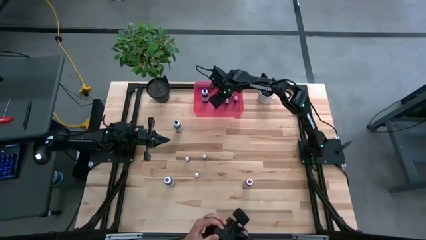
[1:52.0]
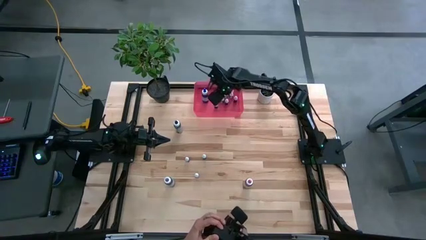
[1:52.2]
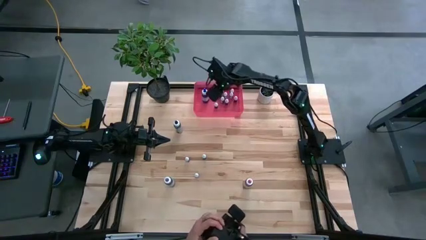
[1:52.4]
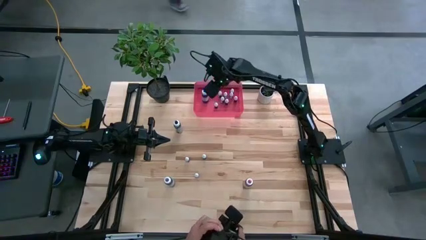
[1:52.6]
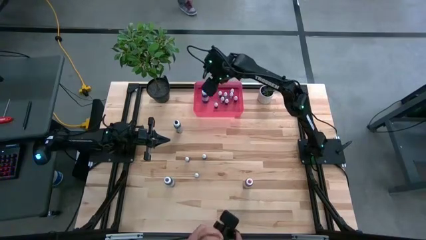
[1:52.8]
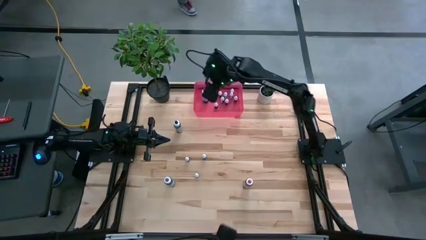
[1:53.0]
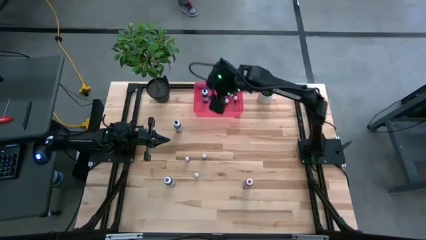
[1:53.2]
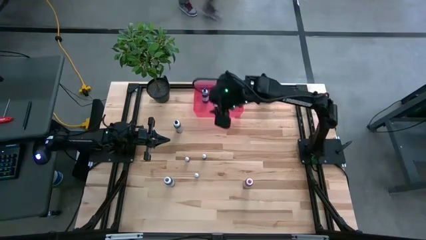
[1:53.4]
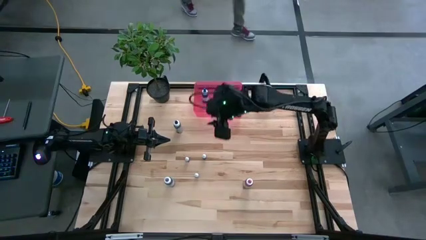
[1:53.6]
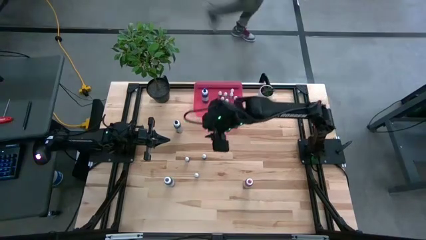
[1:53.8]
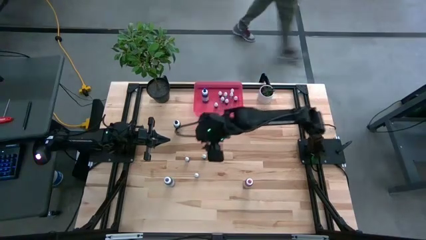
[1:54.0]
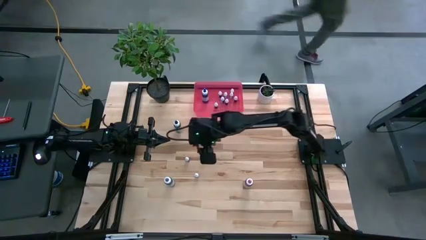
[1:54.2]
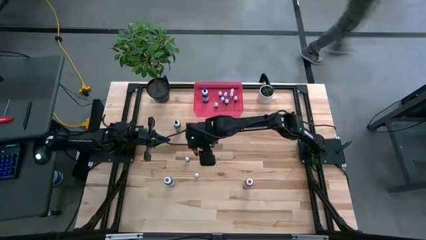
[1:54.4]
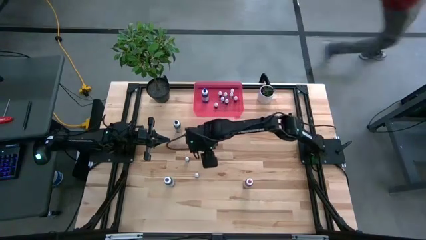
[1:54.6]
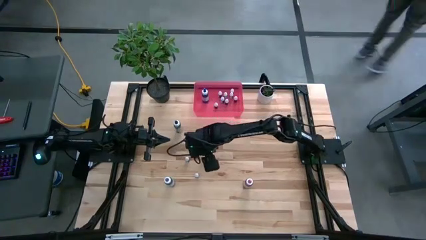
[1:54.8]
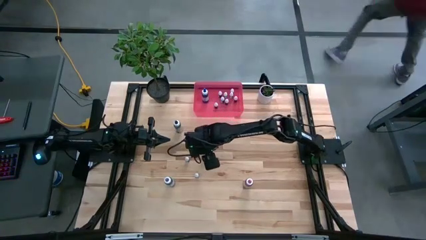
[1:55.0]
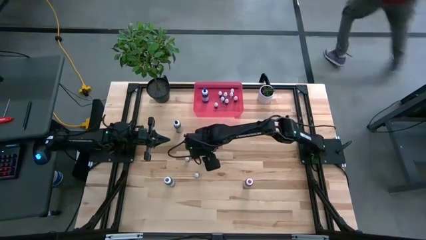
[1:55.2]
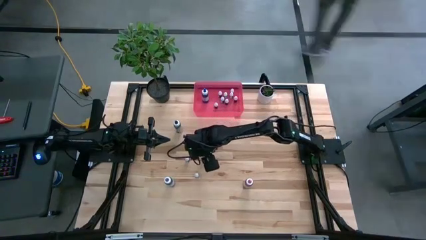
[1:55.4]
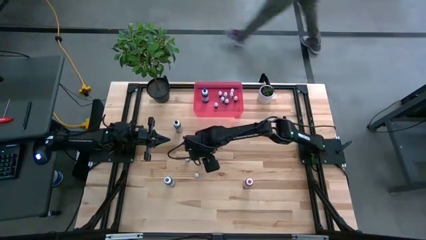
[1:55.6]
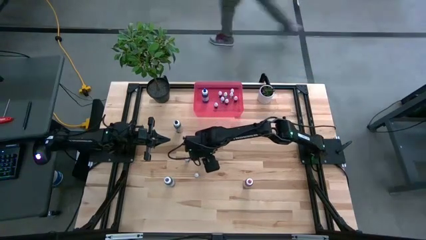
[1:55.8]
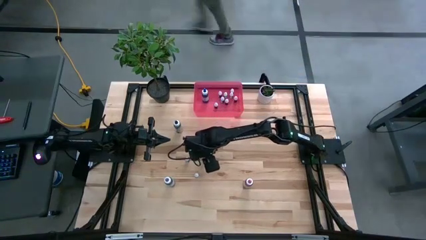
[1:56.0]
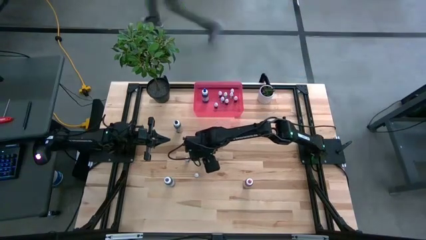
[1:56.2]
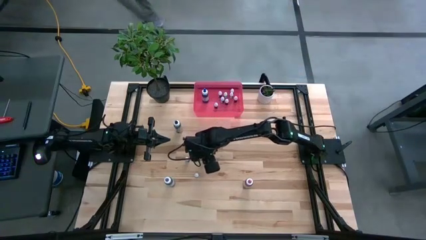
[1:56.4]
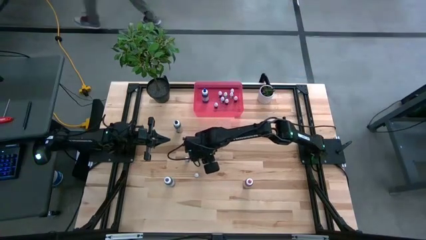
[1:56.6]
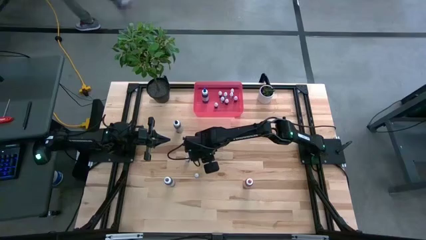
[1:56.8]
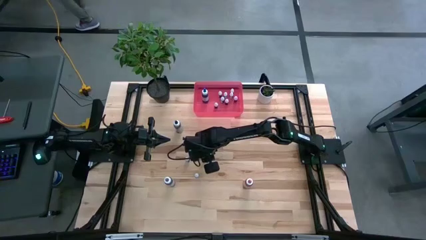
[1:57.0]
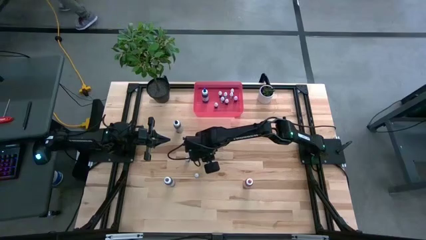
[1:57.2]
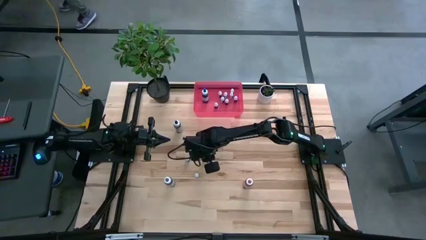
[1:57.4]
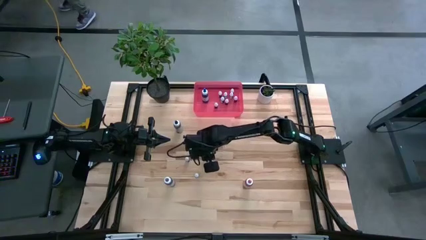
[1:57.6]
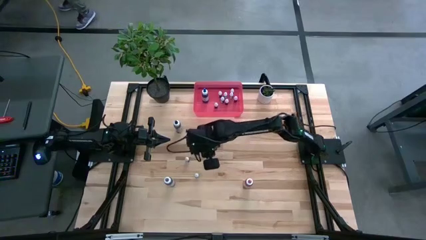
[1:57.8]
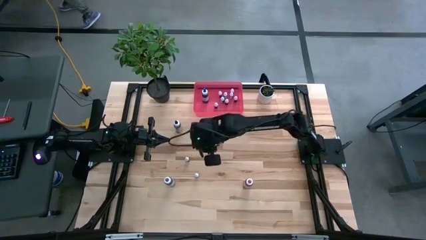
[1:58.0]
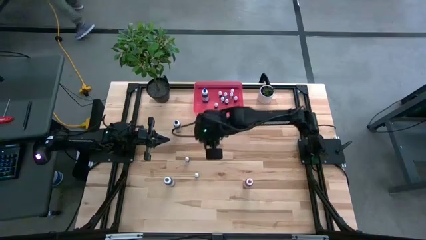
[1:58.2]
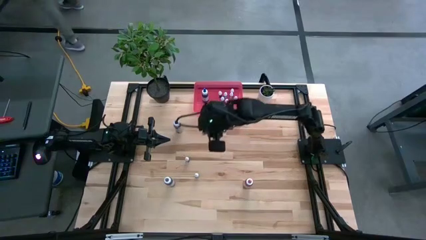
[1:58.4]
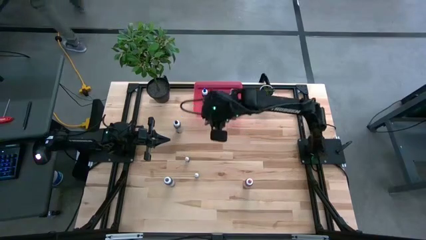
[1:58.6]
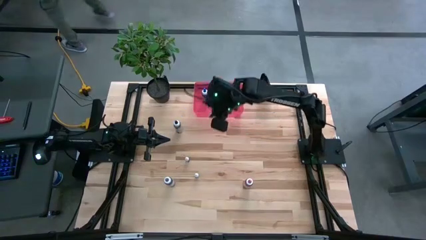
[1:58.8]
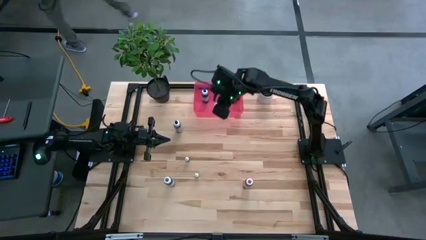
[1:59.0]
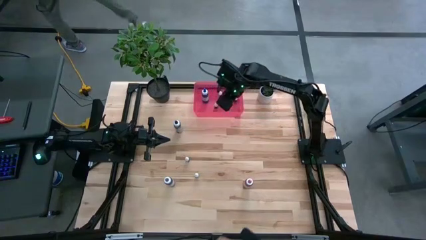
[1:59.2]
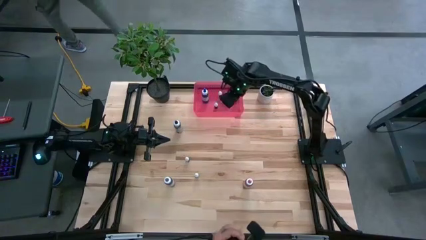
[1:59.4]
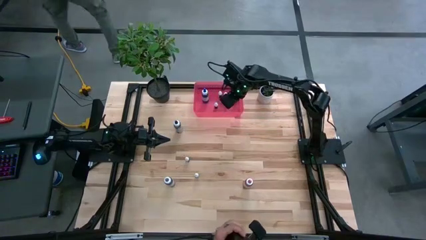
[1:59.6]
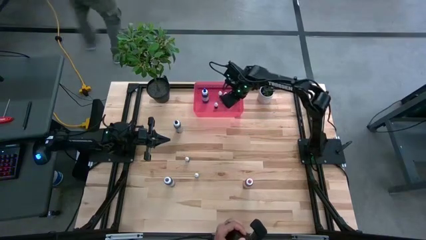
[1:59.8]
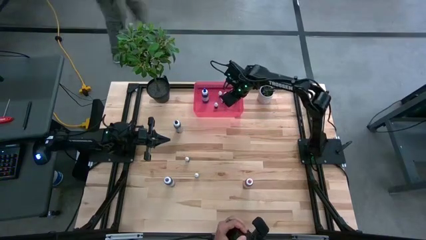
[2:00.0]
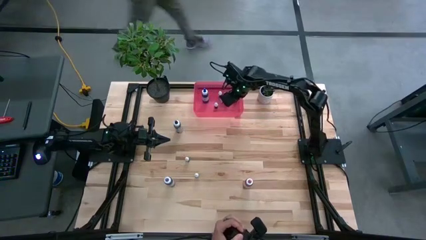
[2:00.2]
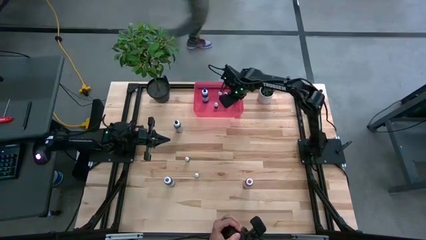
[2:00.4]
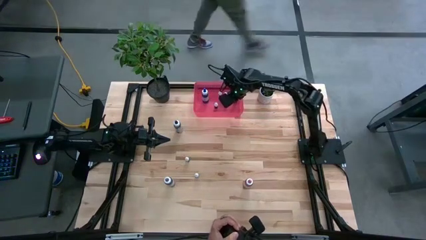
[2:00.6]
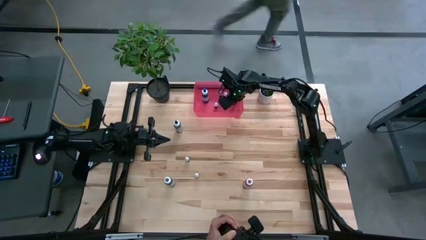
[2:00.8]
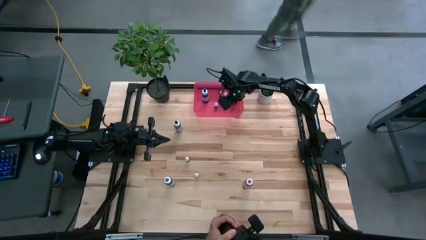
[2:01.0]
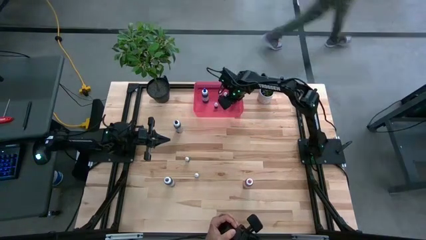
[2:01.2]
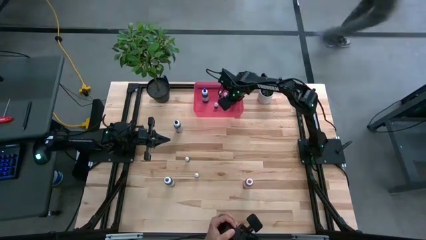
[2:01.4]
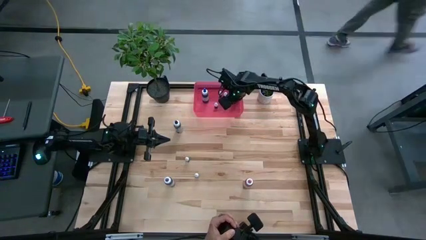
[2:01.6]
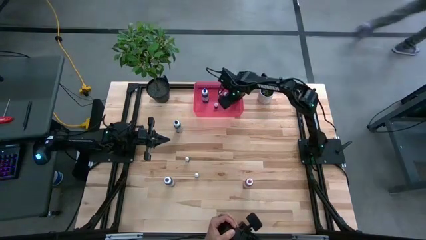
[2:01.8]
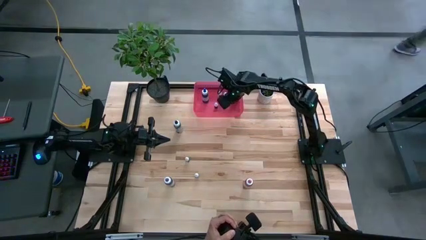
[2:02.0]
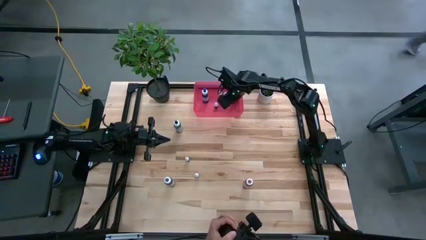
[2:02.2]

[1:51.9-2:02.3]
Task: Pick & Place food coloring
Put the small black food coloring bottle into the red bin

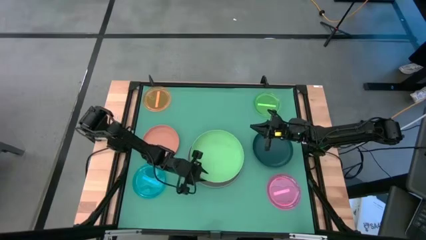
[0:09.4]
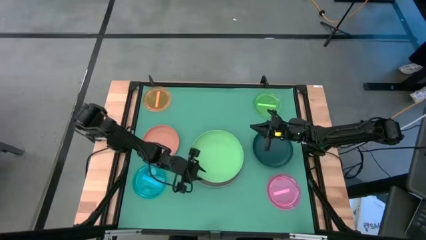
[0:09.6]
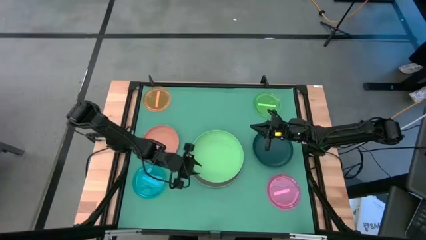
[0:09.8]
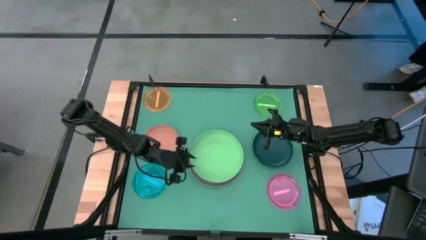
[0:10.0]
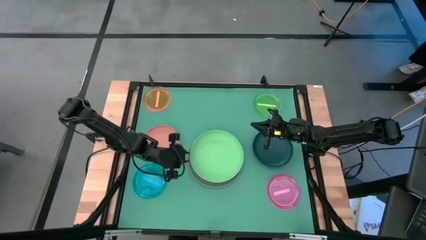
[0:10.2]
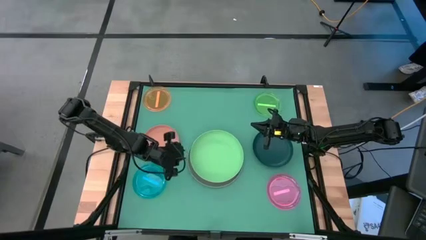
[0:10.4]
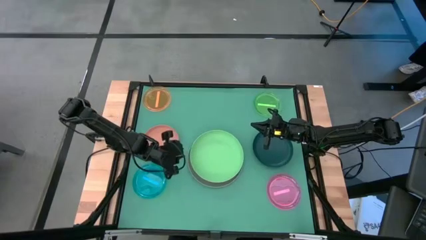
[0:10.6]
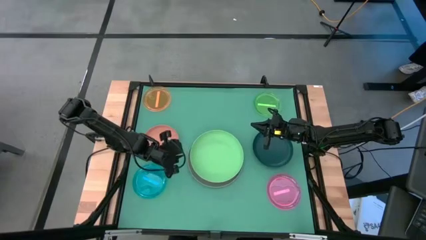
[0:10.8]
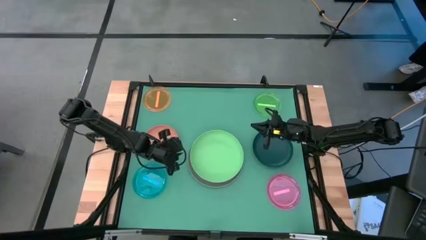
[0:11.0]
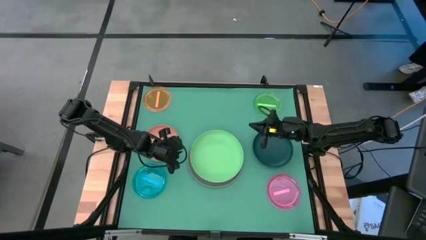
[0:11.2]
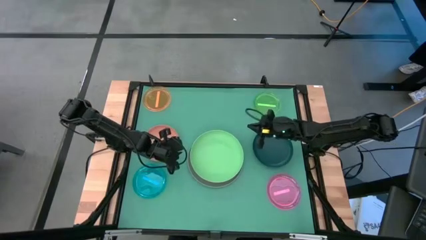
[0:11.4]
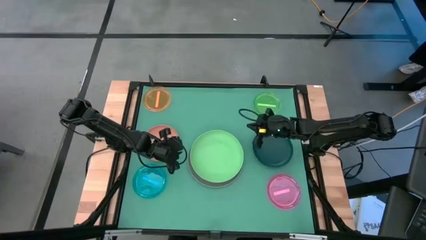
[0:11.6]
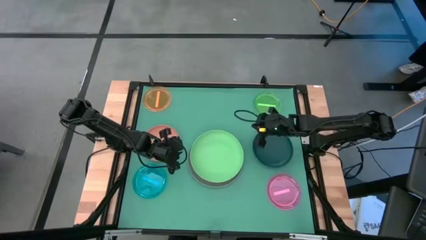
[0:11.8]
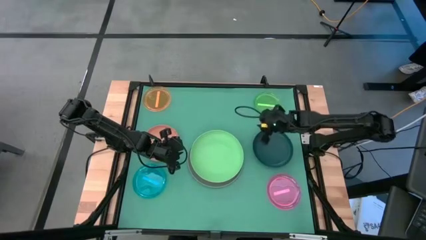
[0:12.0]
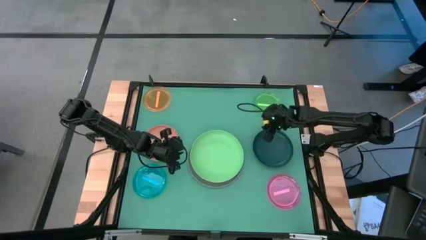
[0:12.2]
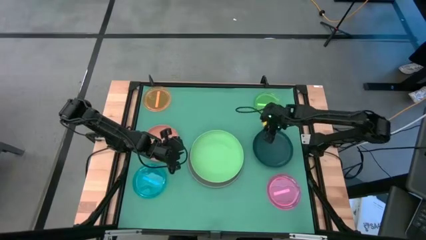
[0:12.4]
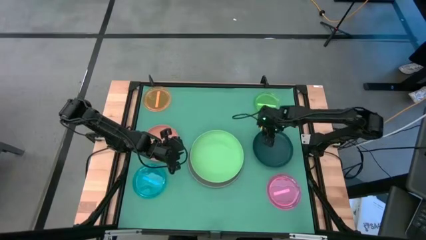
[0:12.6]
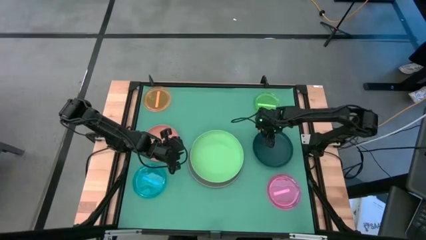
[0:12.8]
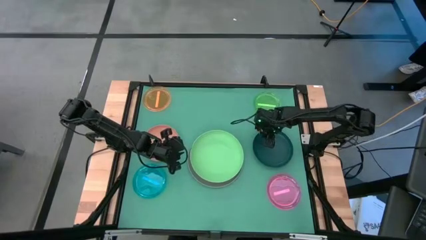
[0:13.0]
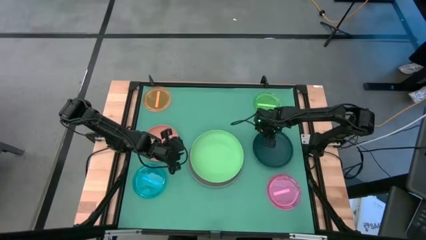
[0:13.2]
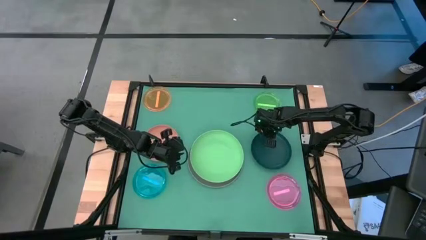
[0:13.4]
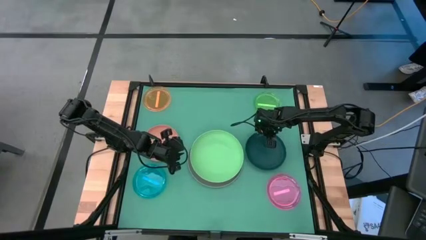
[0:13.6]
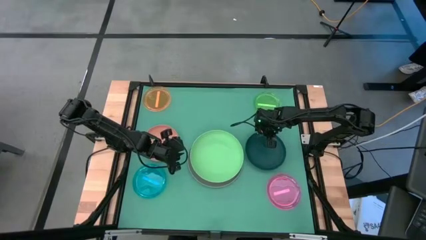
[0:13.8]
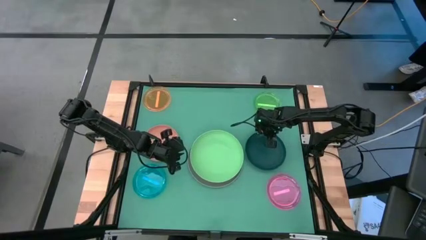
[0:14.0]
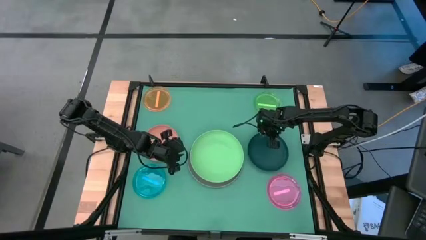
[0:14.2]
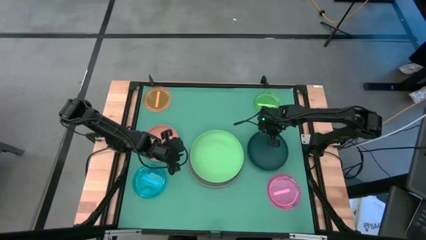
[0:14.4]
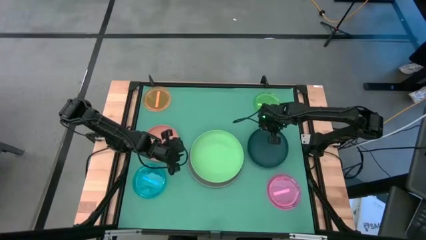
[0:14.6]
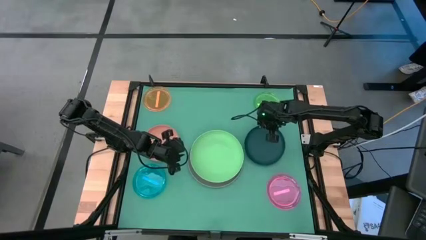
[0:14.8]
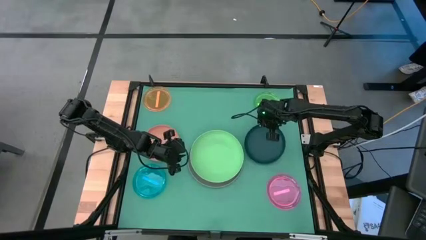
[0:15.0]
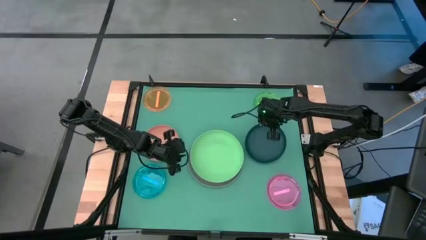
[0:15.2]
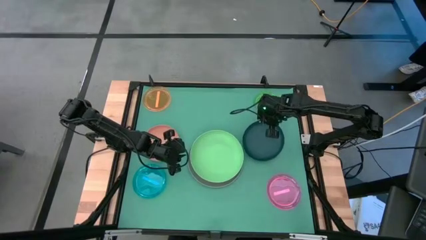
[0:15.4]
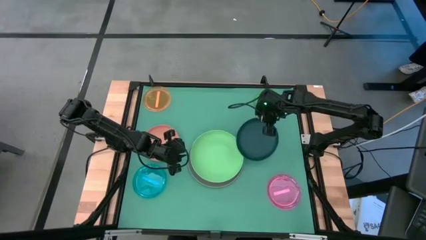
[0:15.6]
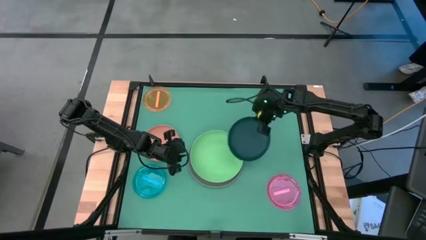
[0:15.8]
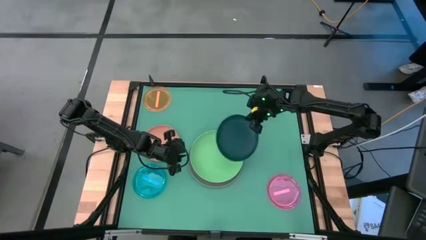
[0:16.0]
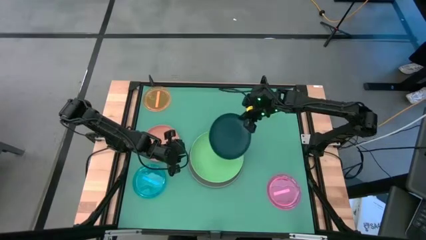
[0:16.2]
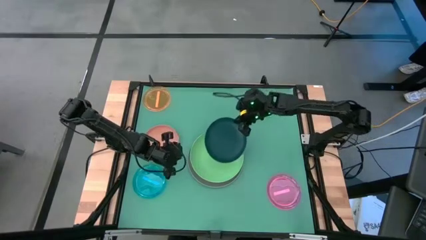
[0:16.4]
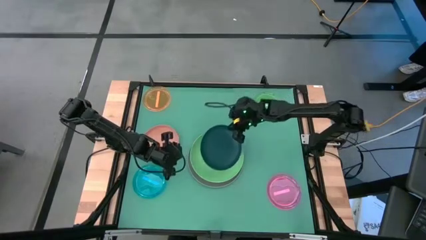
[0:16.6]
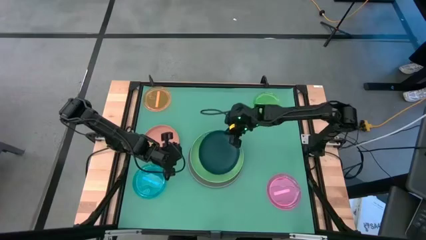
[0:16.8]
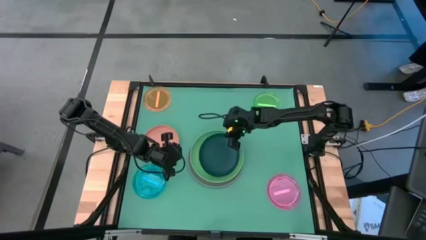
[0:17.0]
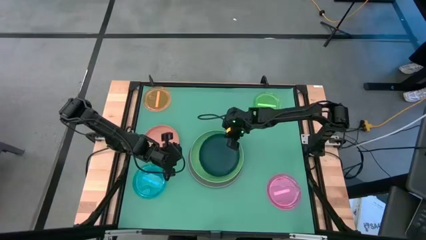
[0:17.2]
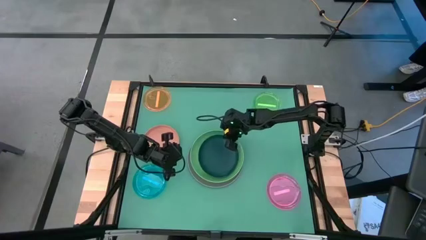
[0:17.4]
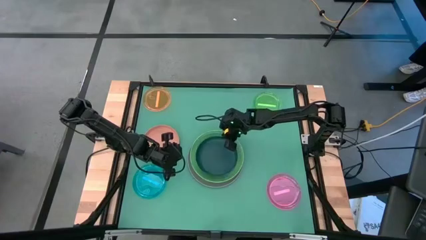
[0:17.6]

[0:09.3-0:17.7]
Task: Stack plastic plates
Stack the dark green plate on the green plate
